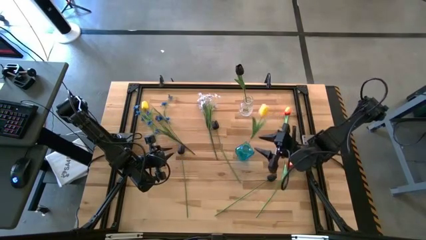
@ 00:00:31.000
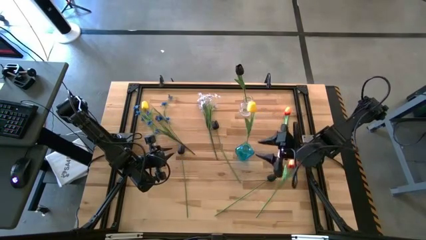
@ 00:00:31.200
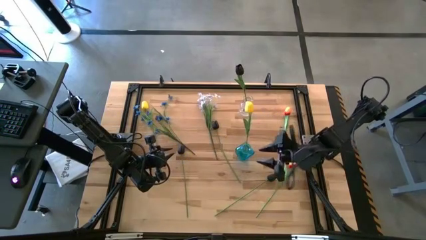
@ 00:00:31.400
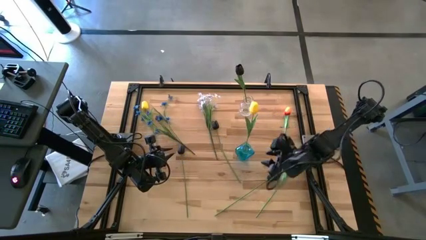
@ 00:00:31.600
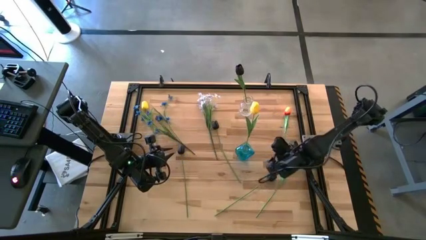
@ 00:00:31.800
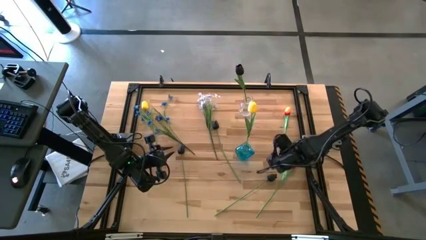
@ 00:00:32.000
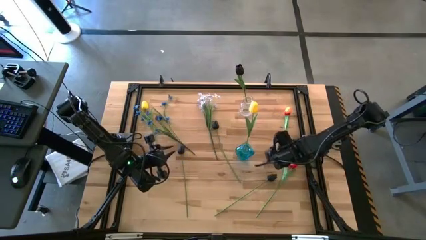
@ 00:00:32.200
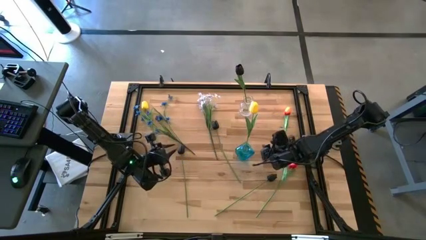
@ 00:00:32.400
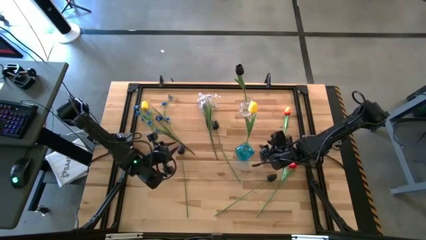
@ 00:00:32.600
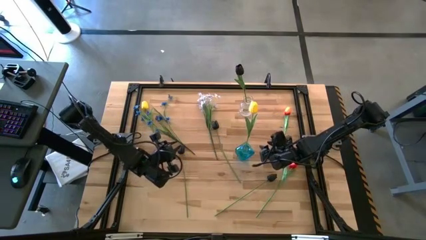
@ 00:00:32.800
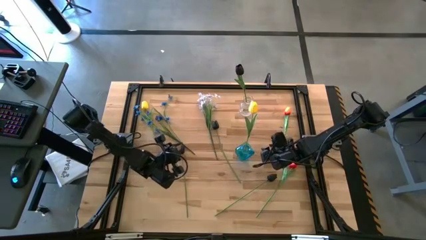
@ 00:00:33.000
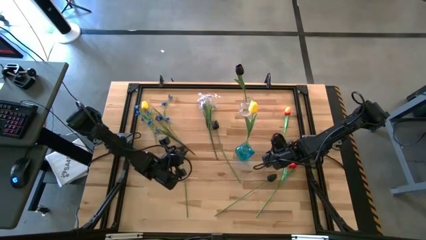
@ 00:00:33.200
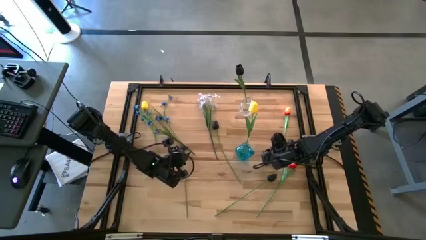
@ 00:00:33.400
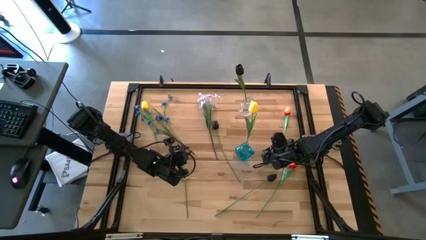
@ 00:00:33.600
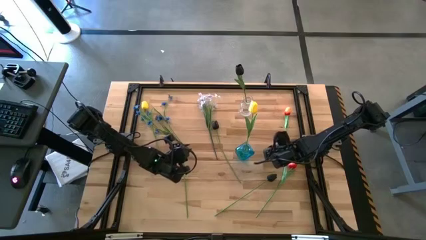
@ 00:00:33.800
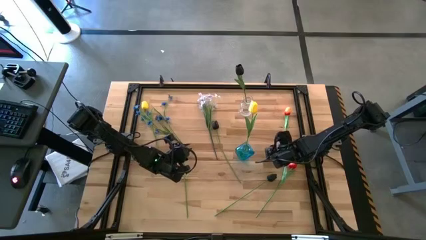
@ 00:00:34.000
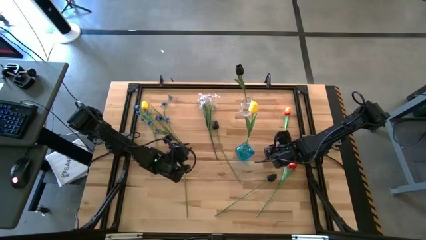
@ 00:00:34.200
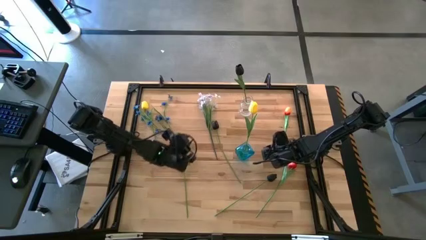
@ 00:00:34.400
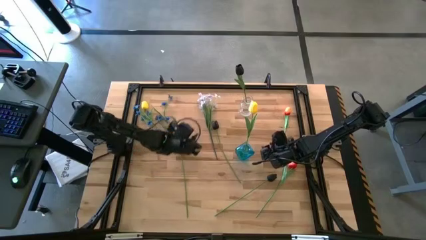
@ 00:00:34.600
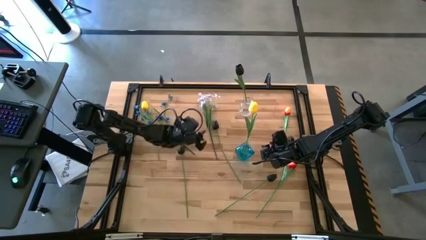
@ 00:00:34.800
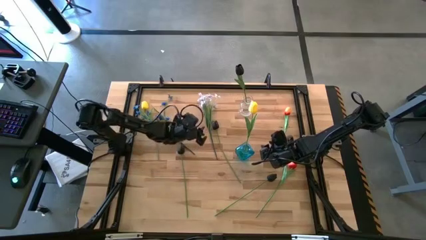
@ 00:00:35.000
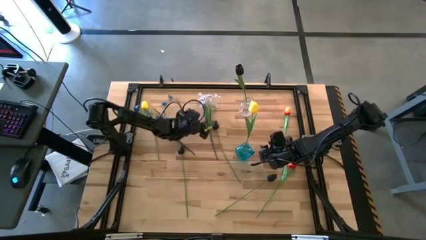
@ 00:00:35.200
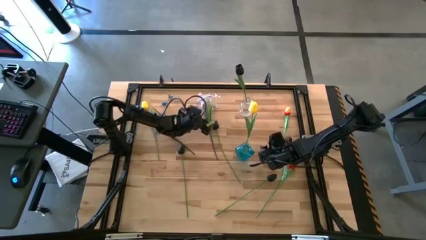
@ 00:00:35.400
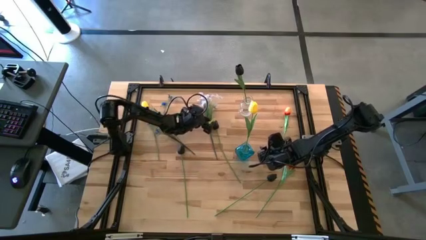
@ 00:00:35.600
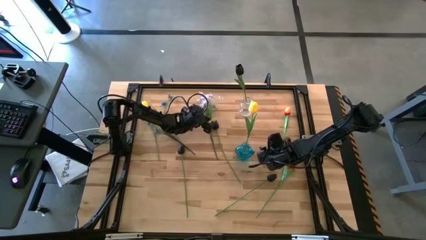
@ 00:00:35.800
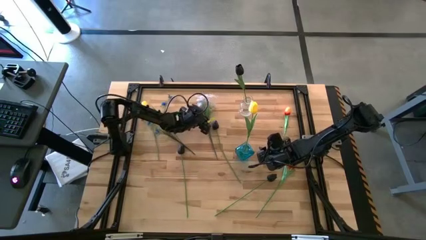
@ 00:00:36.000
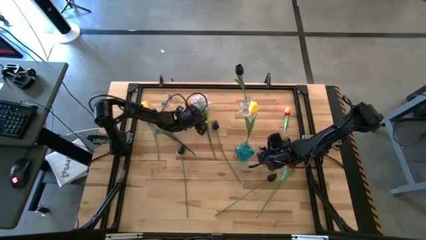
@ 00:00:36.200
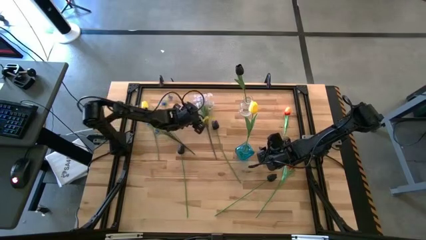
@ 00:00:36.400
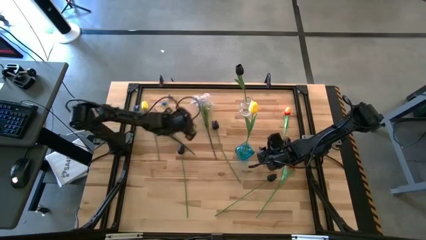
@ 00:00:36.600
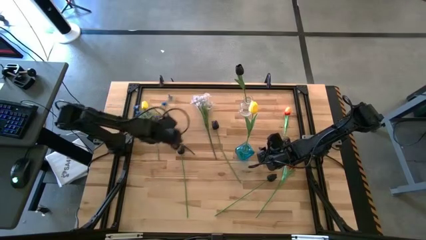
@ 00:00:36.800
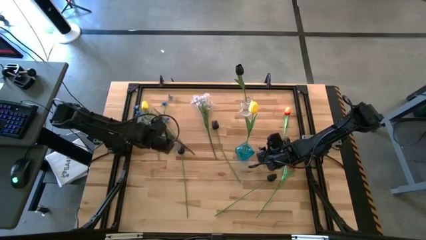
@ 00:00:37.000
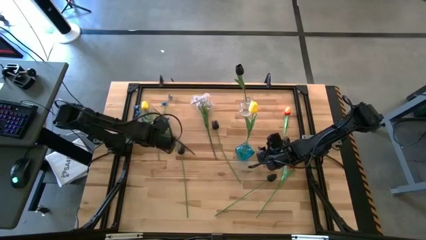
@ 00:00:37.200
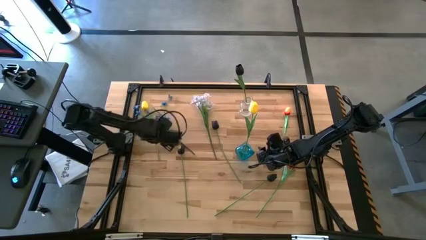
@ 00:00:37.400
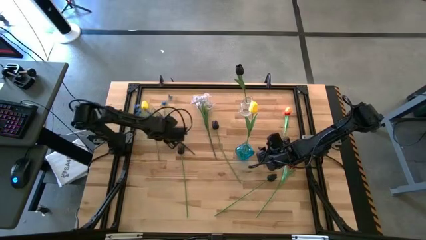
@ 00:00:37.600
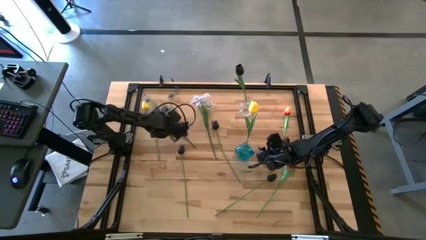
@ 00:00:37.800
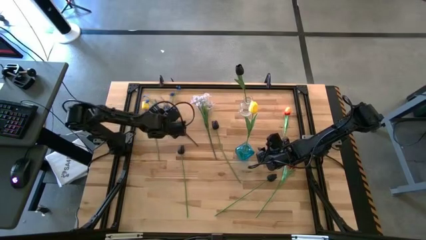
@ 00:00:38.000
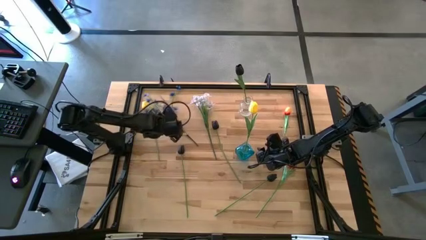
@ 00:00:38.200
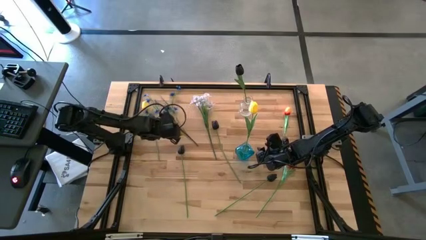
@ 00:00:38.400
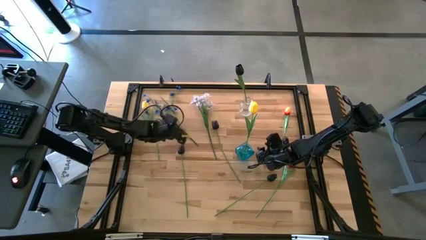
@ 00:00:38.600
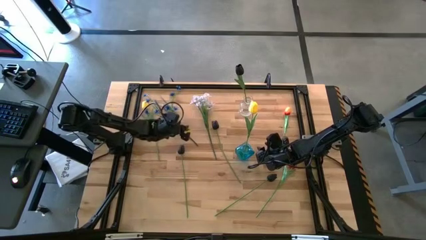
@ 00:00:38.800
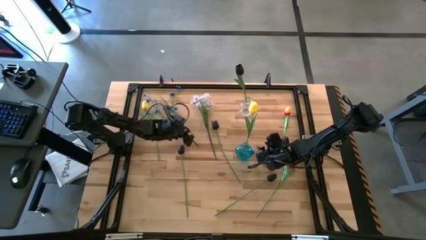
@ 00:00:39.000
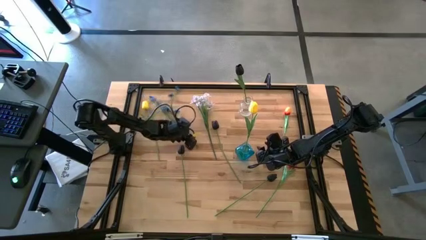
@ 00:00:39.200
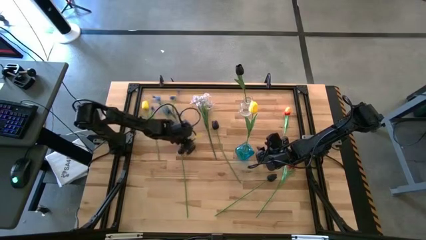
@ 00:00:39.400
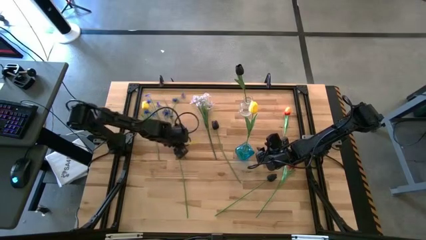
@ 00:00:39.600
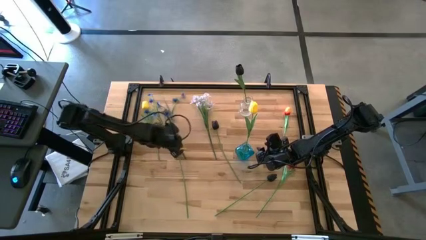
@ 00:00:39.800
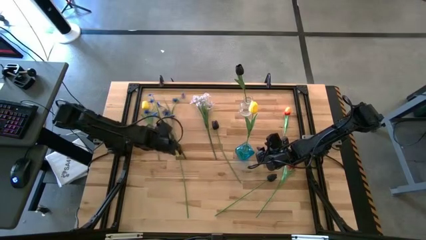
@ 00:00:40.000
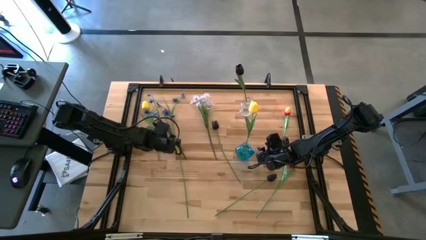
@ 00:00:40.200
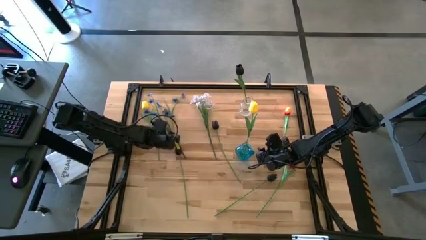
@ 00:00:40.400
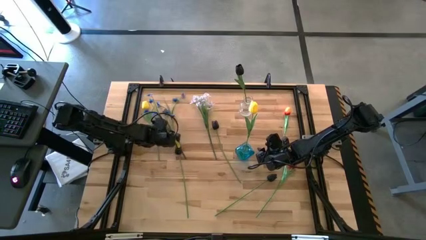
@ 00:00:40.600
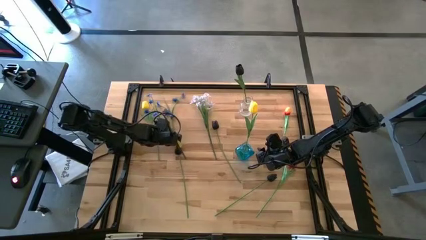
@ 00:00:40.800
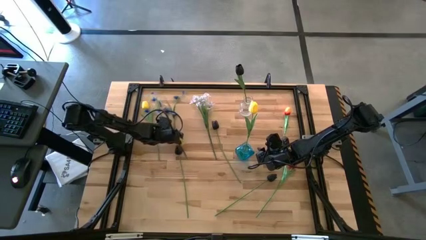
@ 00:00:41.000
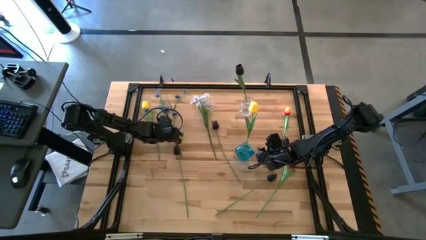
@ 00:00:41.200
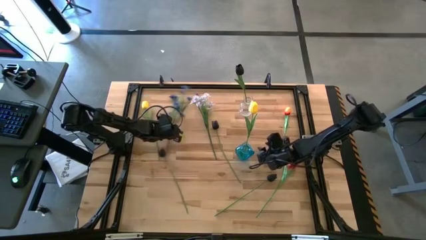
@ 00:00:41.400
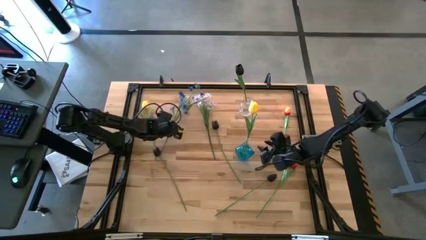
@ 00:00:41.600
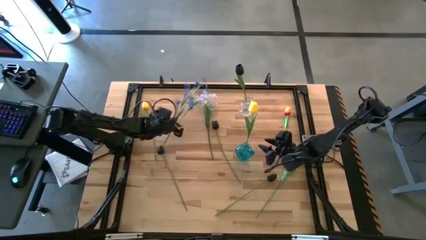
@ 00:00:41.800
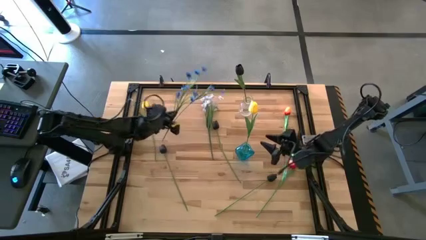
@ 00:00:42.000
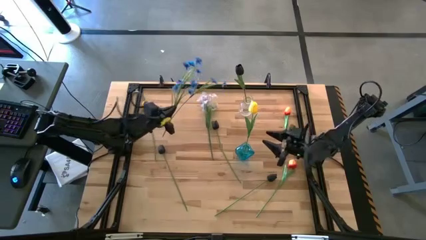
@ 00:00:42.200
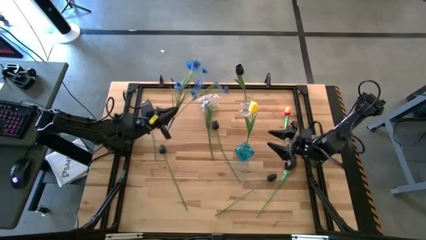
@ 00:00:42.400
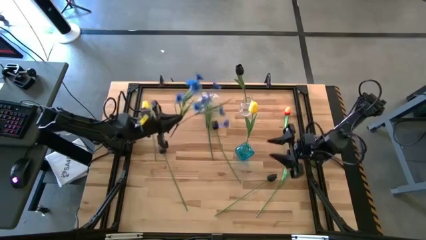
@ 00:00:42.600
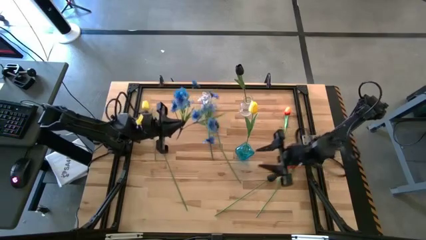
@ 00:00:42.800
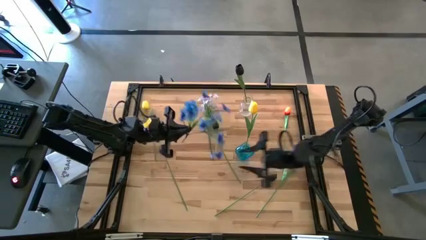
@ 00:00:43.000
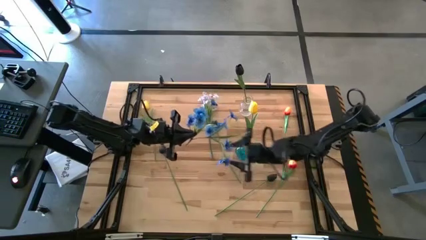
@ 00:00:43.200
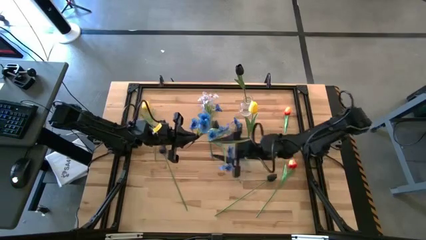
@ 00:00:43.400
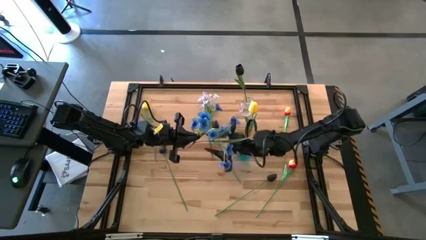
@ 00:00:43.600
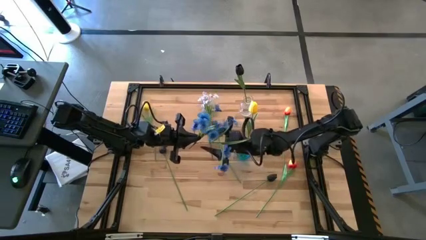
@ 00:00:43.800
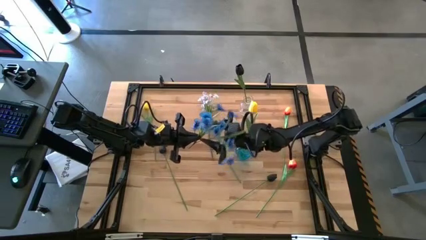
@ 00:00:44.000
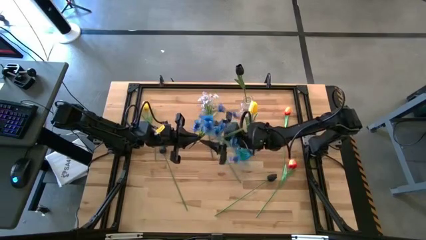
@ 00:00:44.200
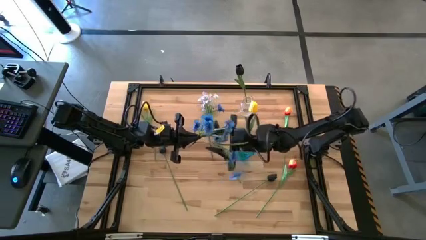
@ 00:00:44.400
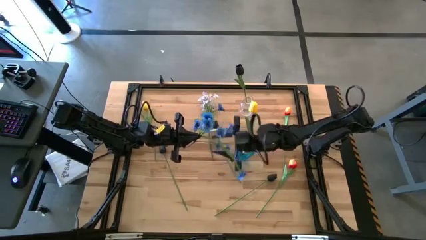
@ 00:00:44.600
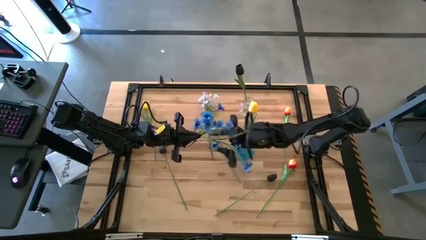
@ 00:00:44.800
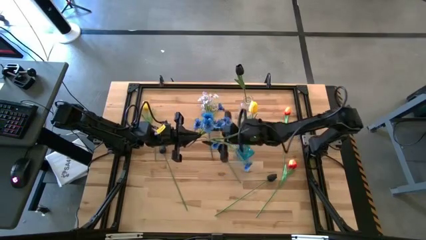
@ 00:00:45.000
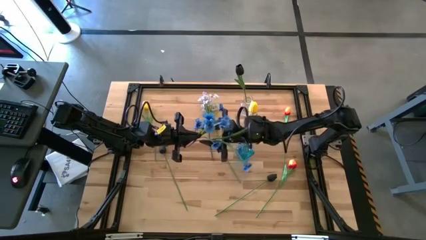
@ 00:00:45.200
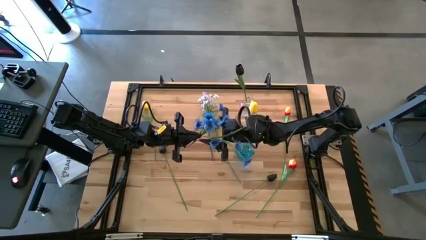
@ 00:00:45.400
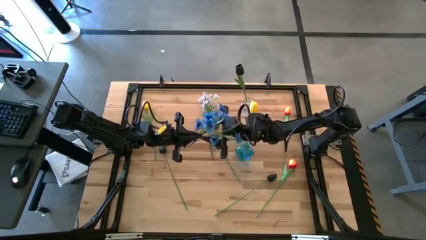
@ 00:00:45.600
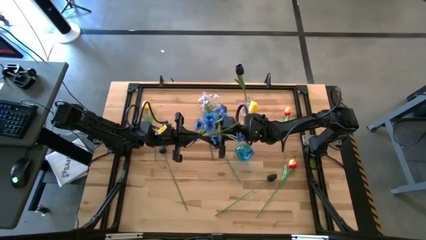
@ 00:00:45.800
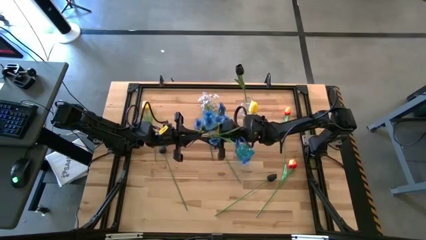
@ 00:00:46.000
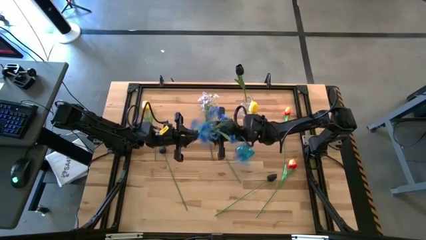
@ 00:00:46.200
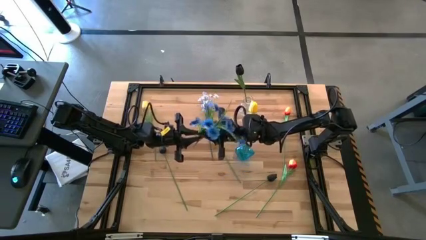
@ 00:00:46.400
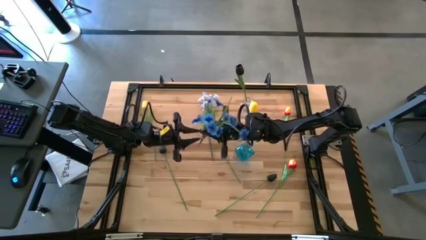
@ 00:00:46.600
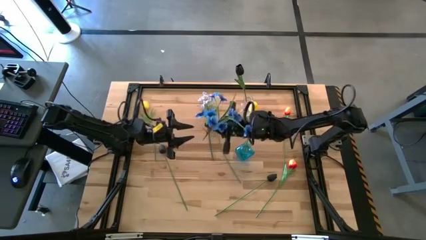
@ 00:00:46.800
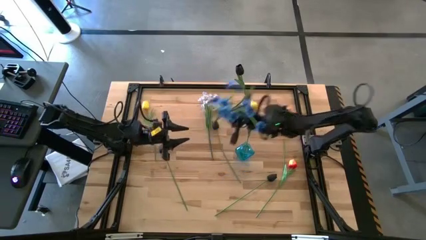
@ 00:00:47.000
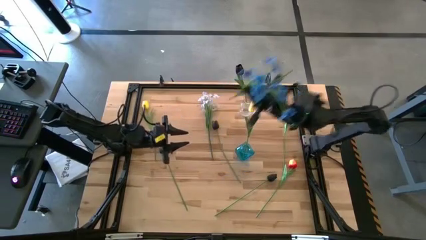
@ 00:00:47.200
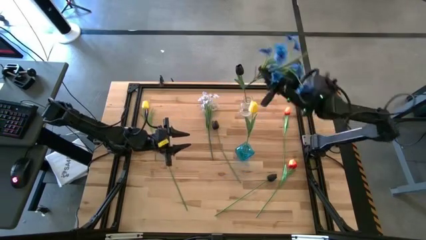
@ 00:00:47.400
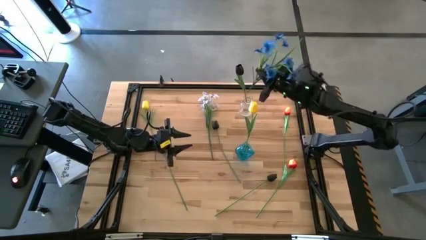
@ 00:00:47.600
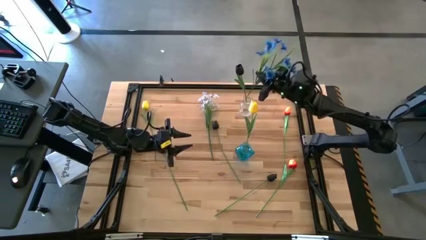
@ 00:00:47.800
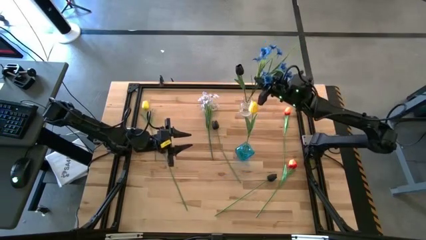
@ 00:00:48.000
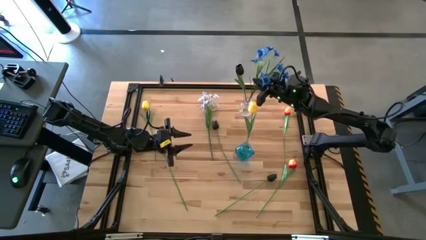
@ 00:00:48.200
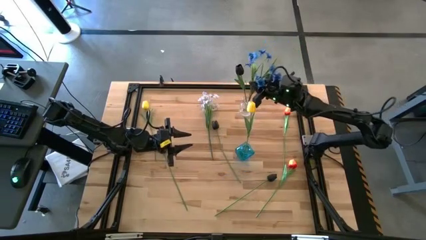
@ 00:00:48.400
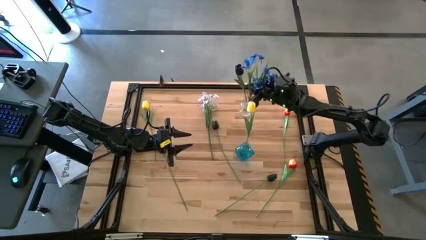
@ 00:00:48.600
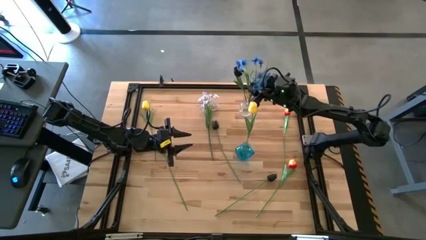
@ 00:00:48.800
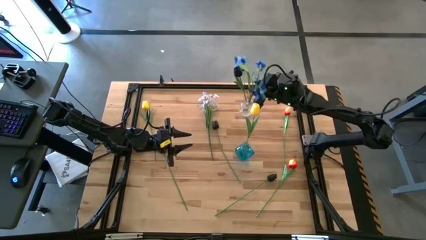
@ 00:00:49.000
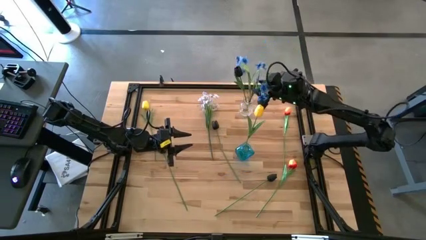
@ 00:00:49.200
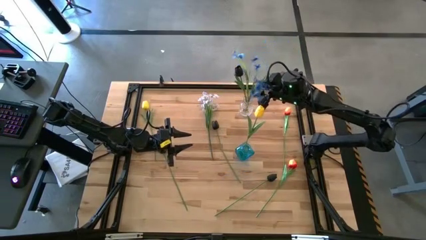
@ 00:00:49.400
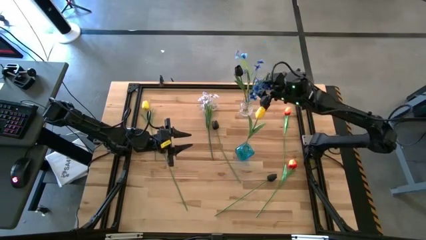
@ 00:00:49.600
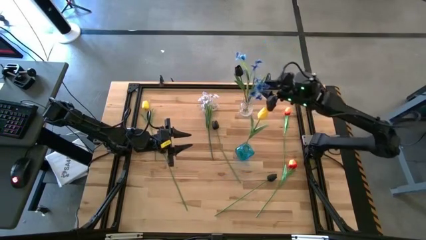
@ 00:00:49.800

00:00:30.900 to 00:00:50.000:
Task: Sort flowers into vase by color
Put the blue flower into the transparent flower vase
